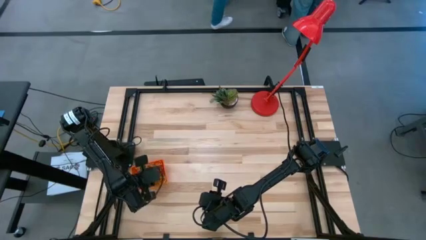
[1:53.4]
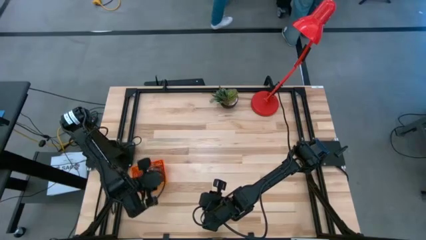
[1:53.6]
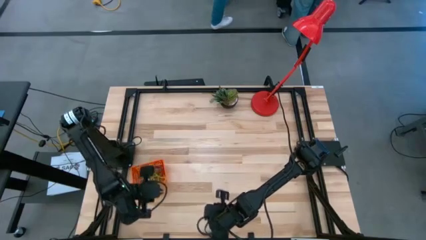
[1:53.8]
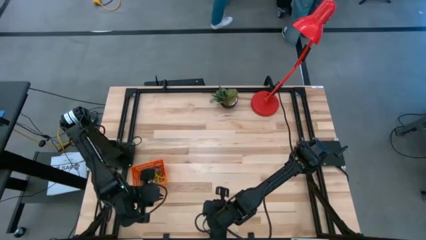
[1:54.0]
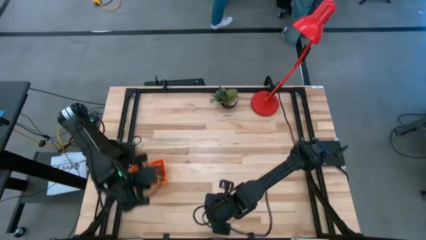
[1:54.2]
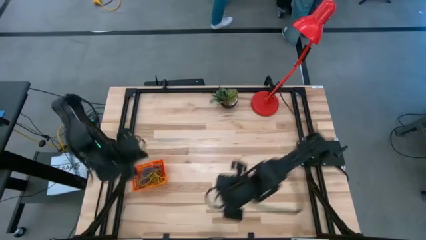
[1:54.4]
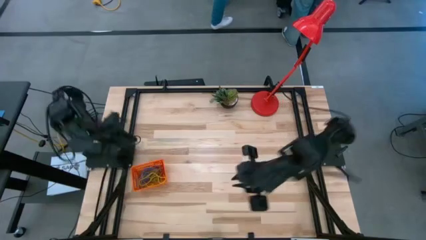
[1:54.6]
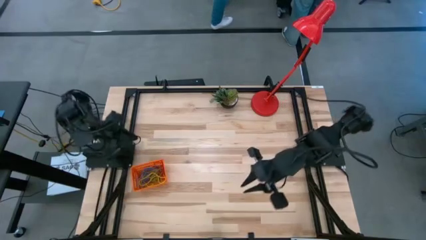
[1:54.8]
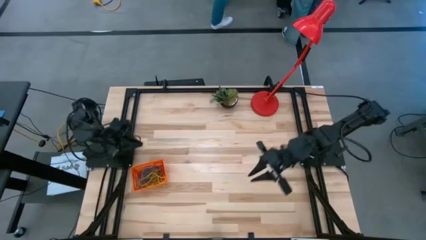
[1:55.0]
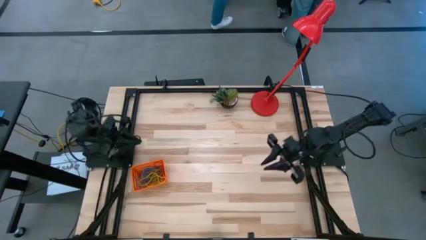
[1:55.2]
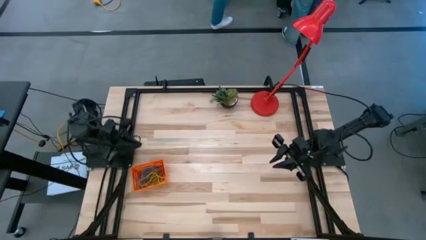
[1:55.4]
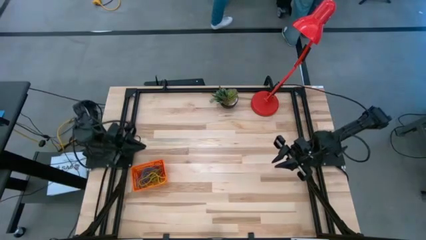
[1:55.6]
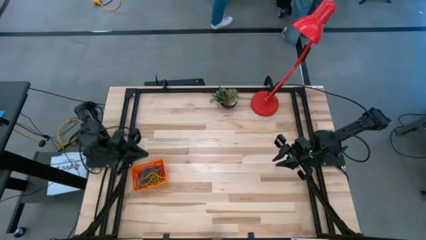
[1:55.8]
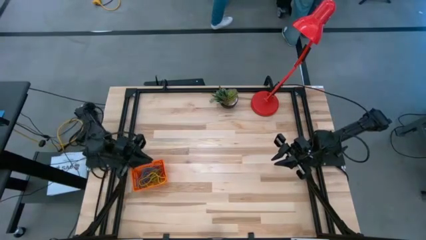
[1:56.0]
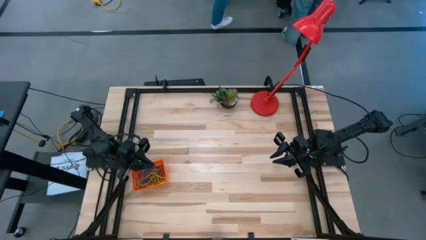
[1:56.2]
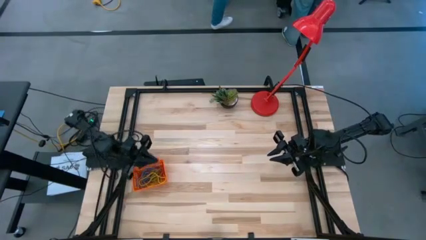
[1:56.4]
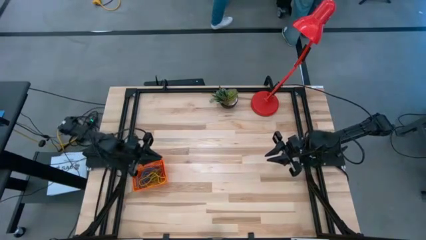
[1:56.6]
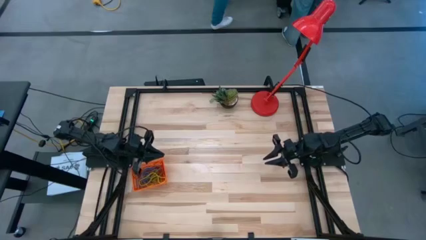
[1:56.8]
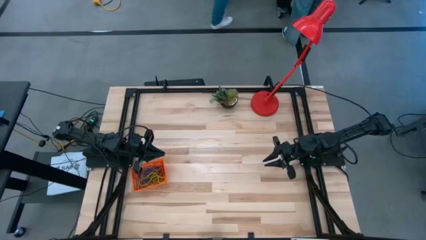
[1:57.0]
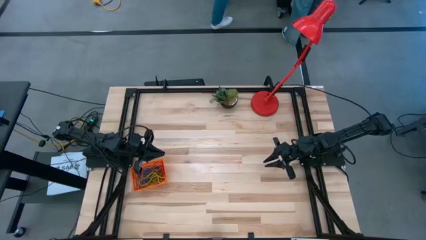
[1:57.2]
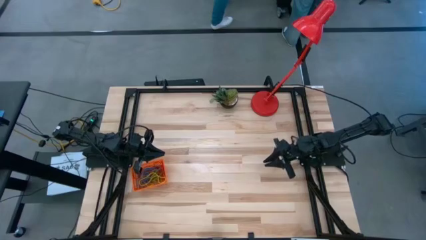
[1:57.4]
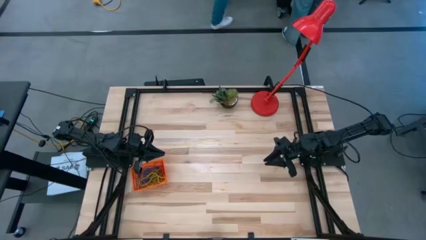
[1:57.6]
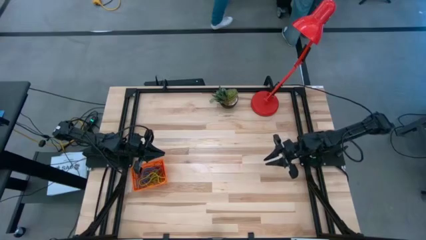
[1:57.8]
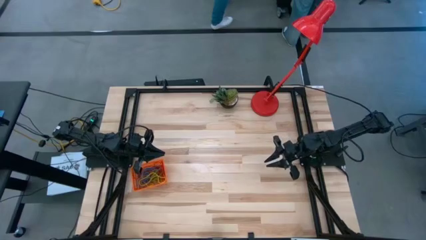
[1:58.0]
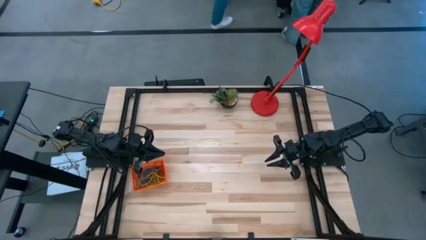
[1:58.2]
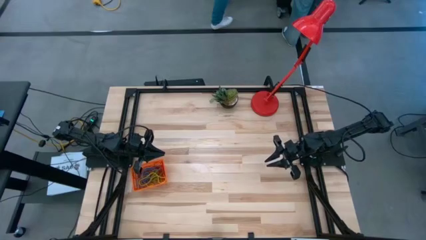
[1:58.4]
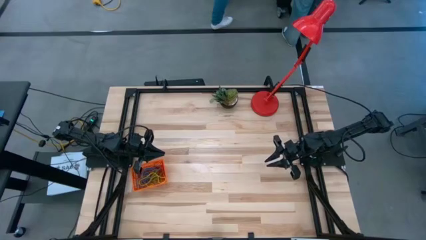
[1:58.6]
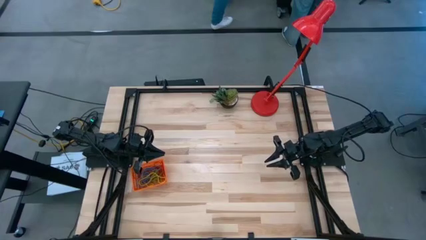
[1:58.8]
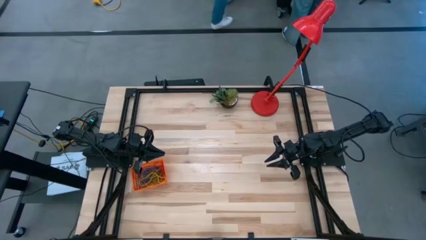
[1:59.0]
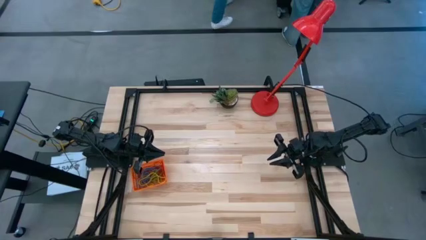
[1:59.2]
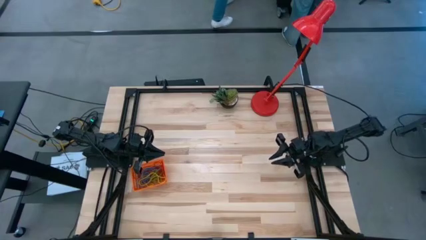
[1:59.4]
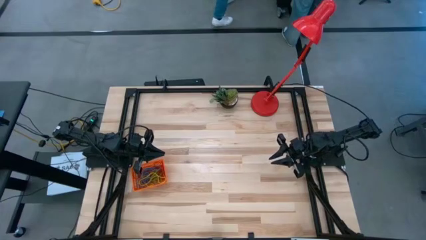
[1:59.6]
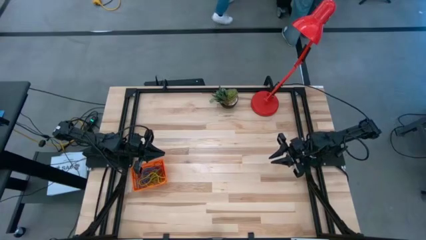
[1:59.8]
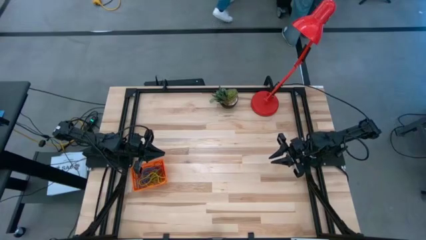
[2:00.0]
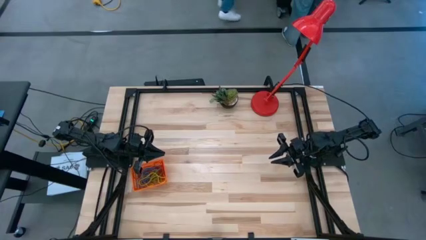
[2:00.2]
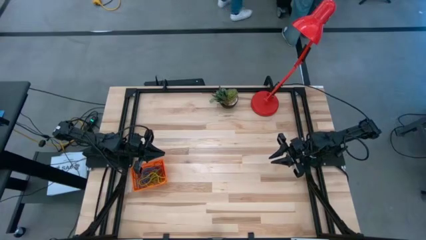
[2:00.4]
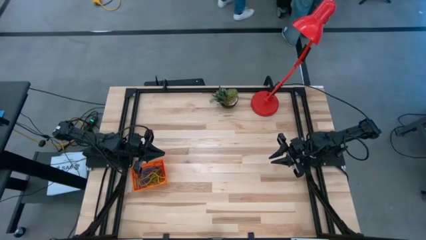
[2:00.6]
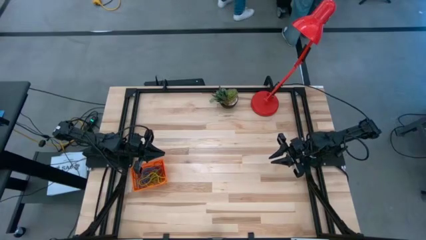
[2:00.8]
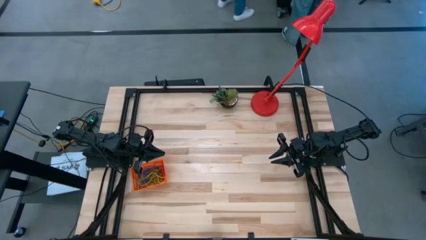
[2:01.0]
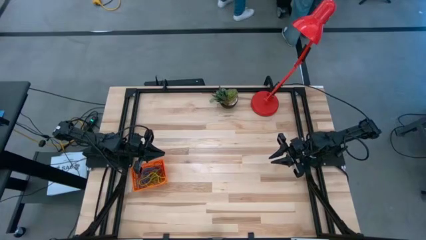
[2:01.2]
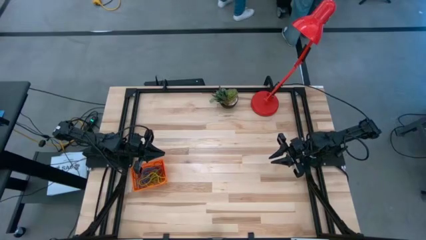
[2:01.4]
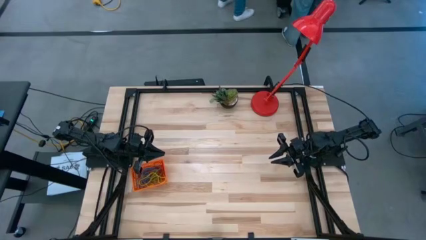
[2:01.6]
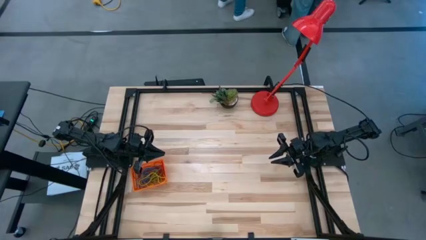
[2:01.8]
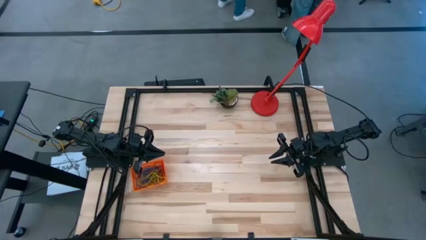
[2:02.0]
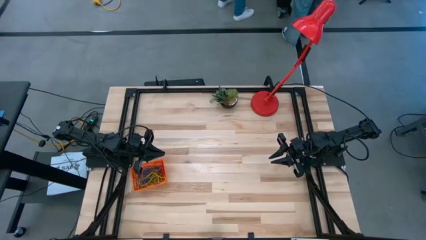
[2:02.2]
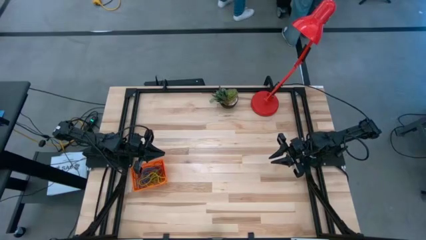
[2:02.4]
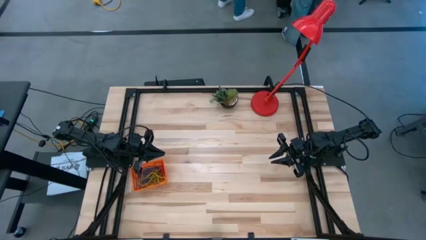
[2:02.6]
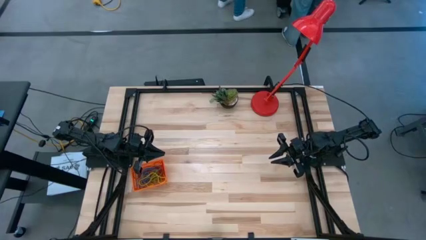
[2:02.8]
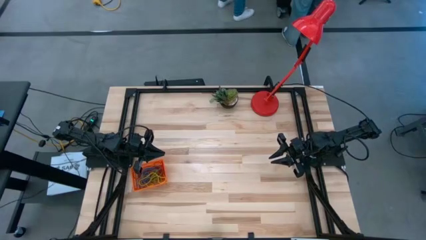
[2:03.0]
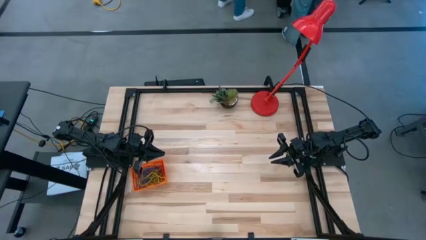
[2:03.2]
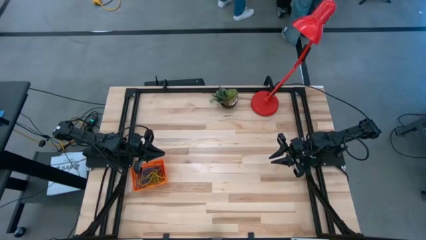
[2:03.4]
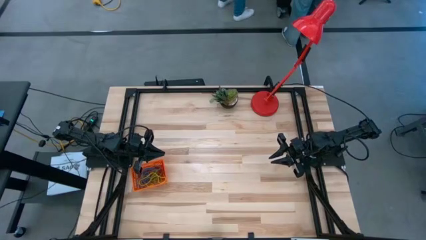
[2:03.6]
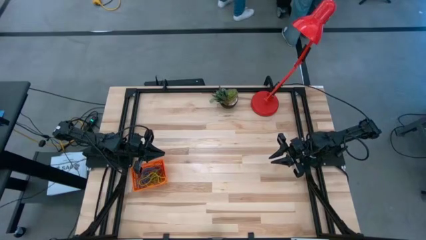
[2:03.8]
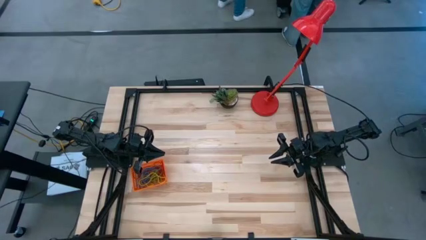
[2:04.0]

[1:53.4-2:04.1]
Task: Pick and place rubber bands into bin
Return to Home Position
